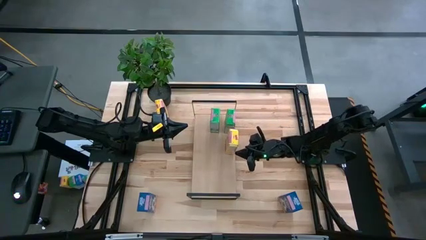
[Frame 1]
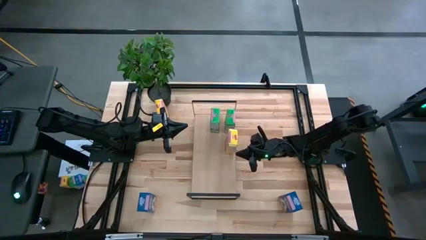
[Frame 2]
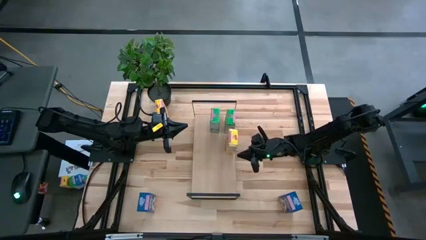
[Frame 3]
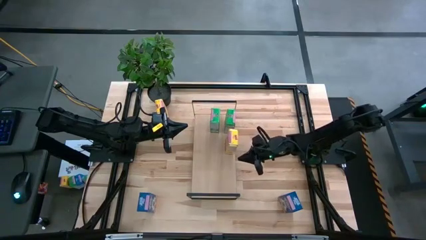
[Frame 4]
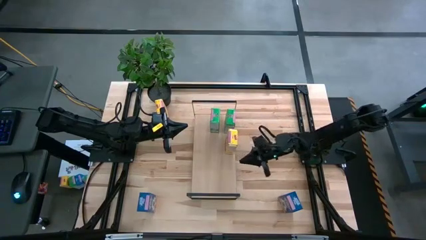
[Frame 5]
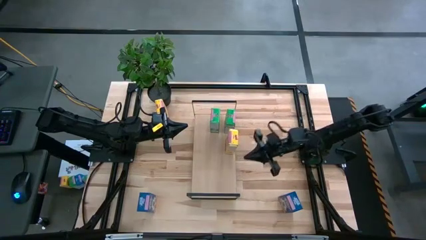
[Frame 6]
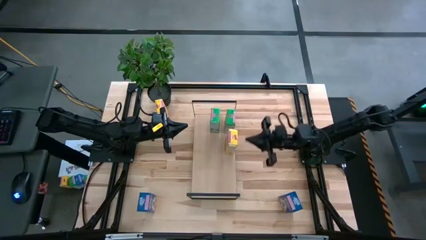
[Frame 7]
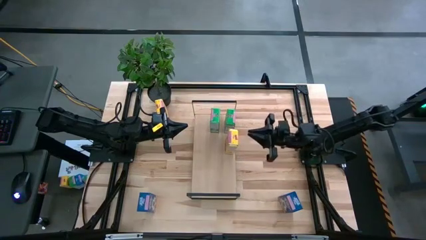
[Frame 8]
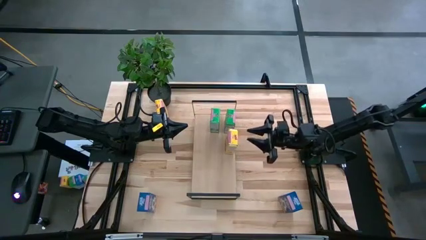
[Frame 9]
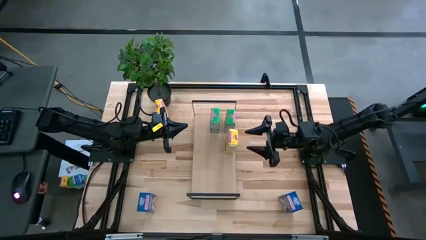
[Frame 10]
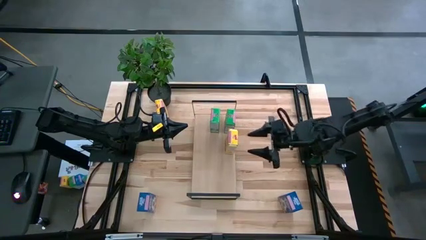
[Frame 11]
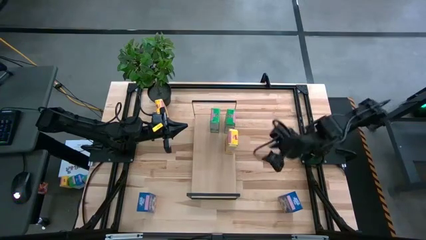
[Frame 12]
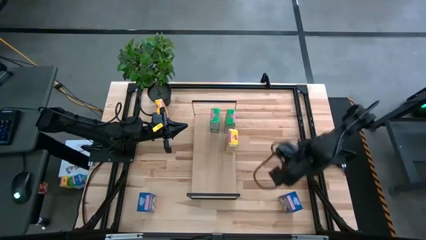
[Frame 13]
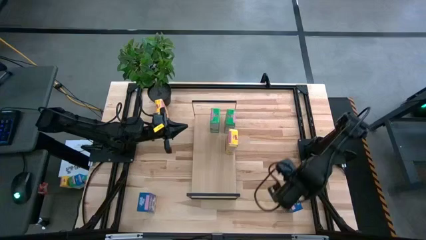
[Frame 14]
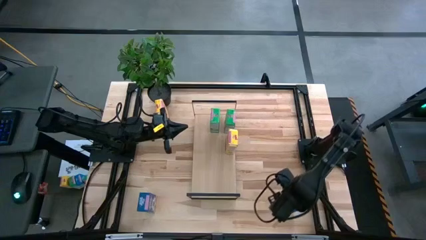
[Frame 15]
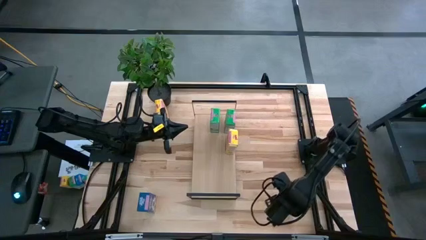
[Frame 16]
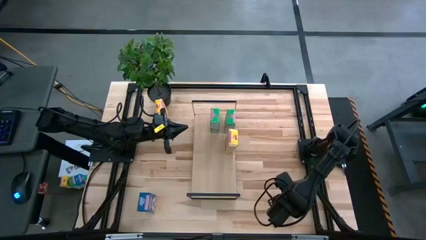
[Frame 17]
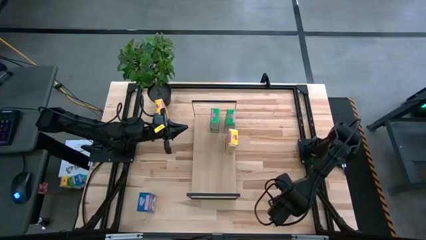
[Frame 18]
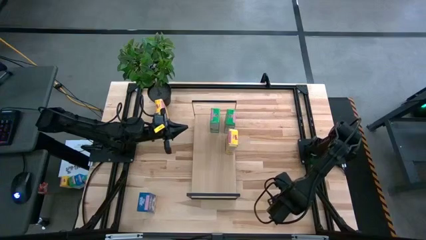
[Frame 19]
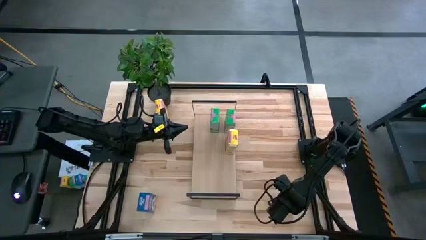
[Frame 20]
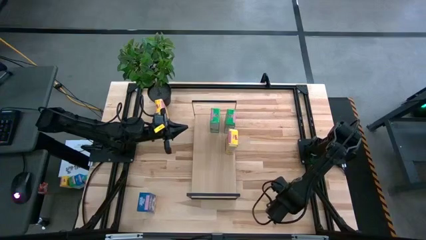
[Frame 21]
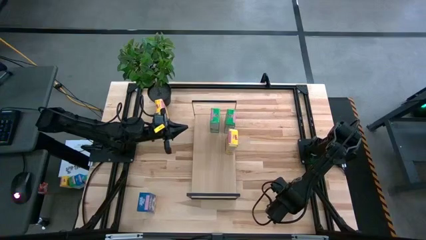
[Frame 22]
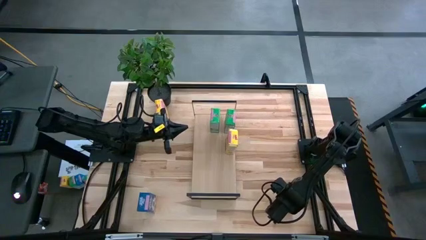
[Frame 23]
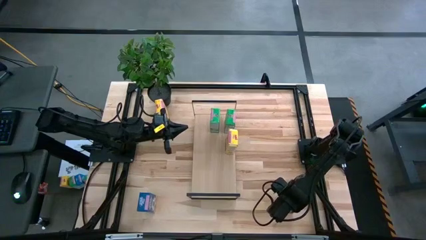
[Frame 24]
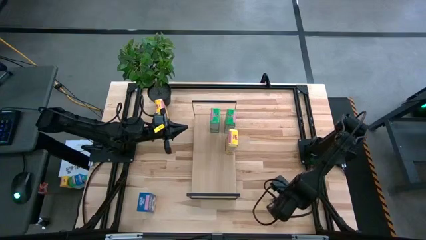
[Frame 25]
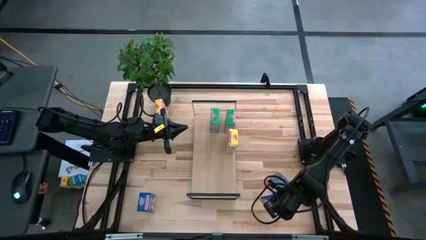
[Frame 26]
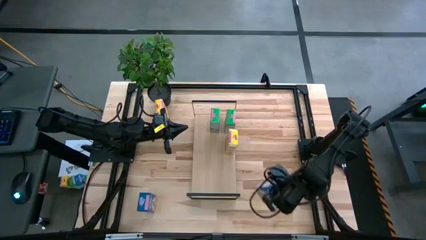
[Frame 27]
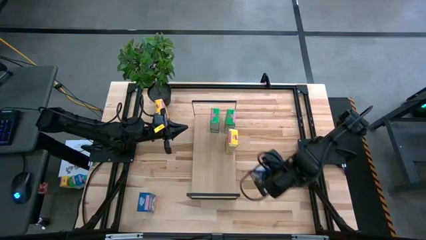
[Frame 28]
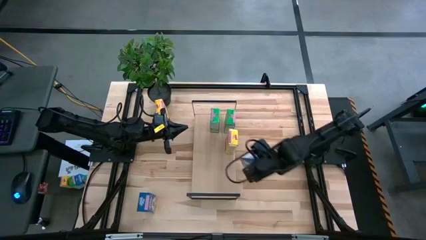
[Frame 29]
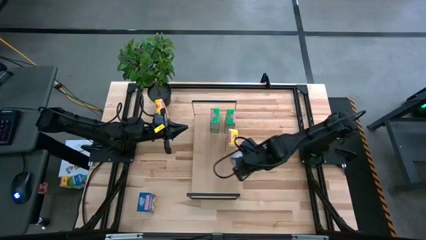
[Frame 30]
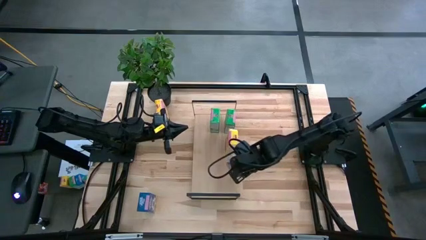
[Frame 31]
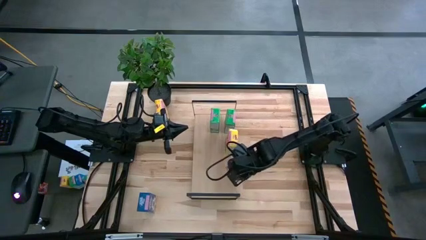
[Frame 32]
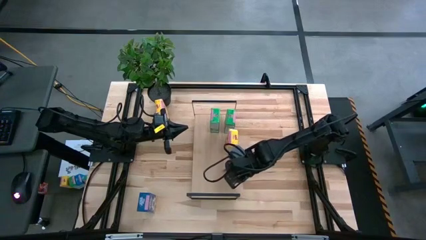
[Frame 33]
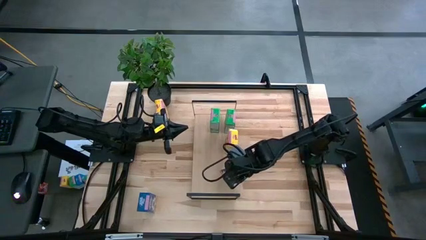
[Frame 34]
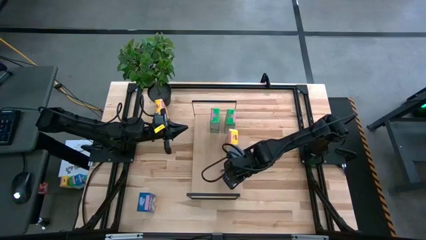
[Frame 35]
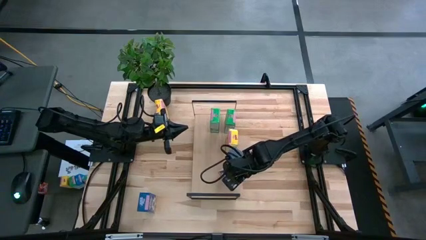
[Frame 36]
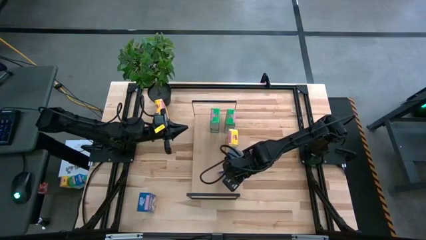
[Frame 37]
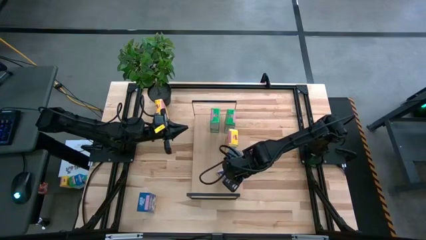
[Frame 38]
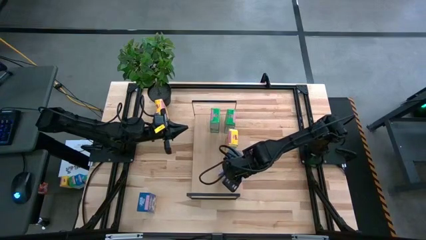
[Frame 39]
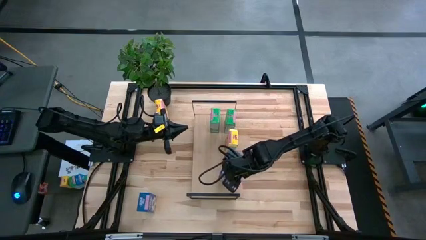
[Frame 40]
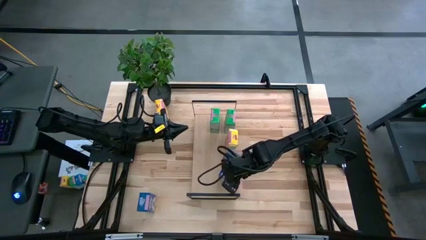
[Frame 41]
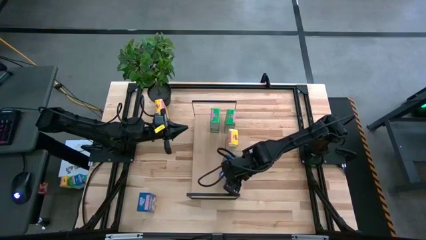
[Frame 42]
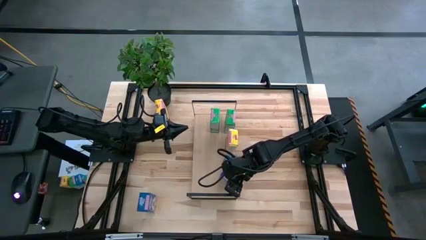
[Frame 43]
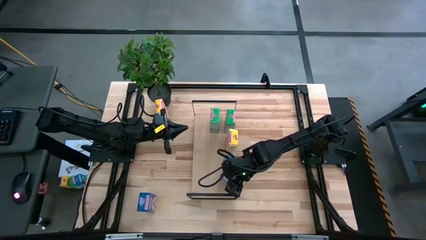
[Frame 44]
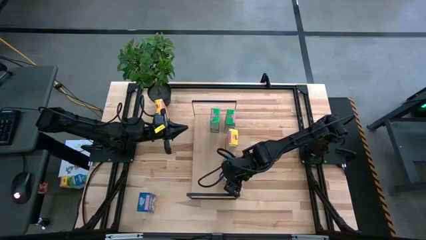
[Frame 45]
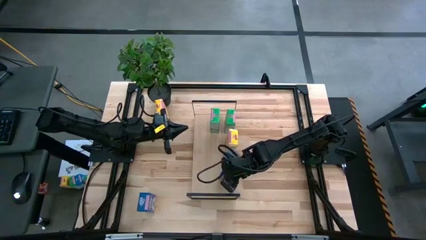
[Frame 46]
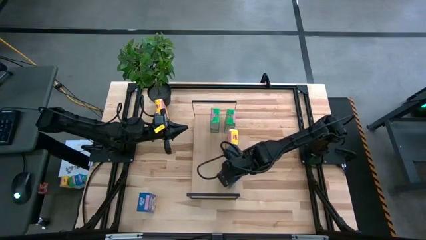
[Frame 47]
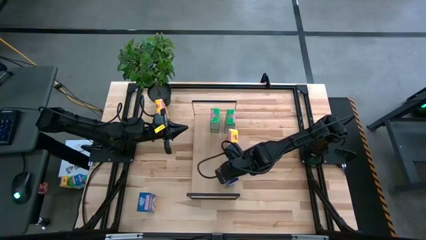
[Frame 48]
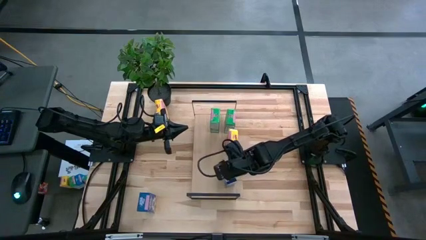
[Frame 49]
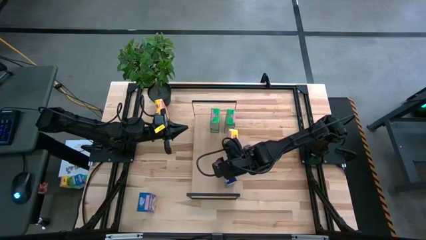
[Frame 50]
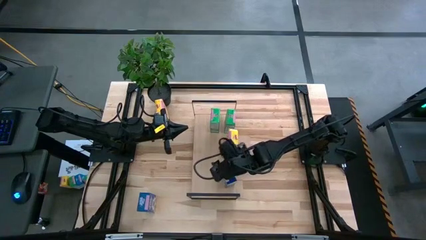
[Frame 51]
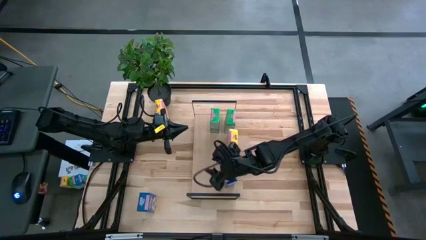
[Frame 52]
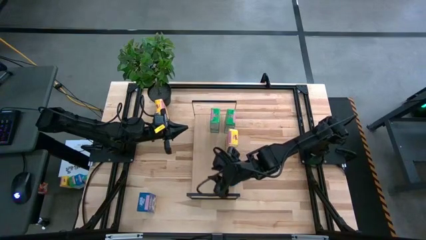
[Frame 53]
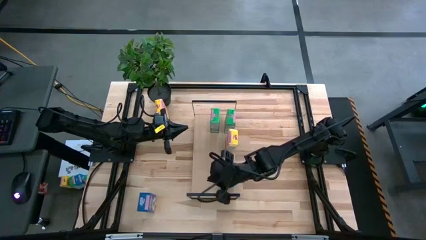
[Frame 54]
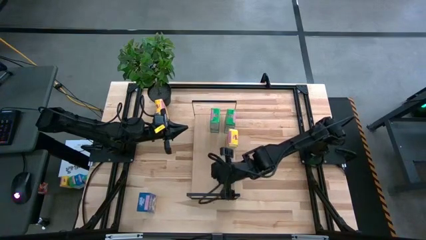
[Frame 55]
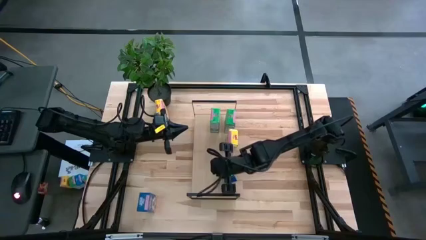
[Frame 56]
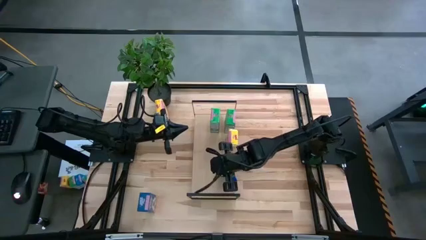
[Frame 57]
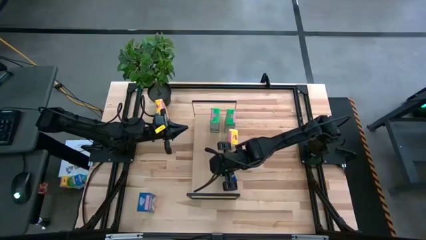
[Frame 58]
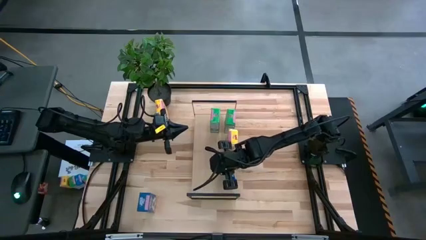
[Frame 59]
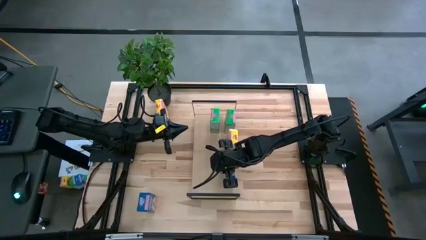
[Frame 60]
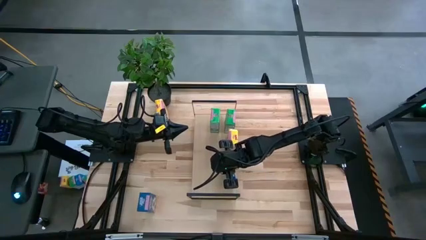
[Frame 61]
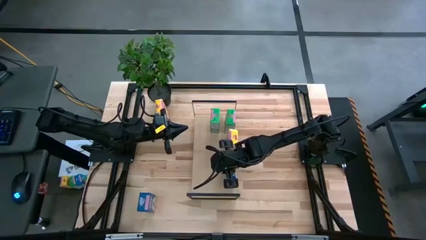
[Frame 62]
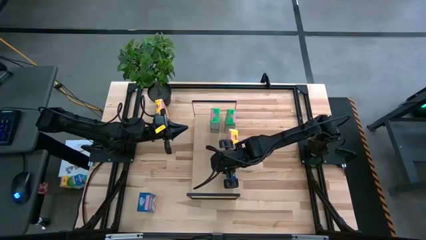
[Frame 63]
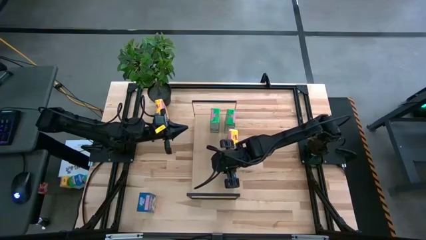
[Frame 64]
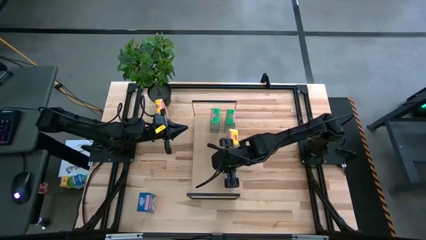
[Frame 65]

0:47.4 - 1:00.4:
Task: Stack cereal on shelf
Put the right blue cereal box on the shelf

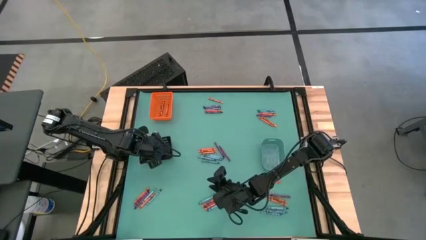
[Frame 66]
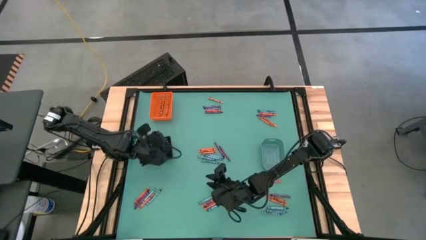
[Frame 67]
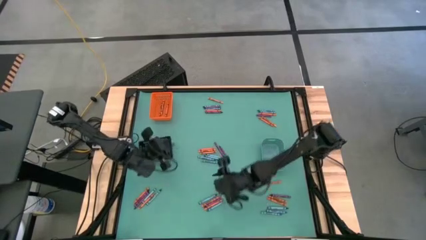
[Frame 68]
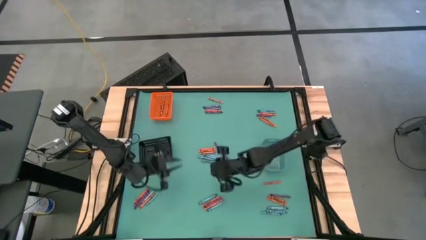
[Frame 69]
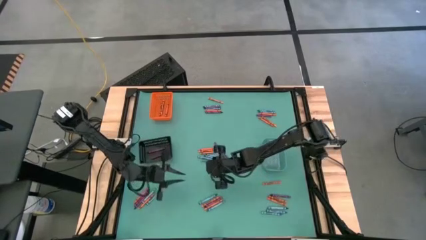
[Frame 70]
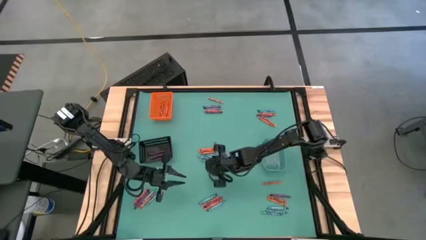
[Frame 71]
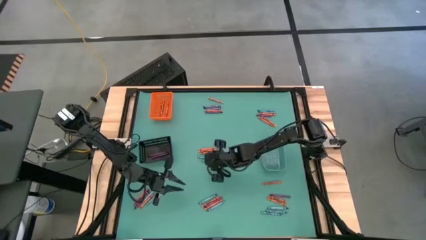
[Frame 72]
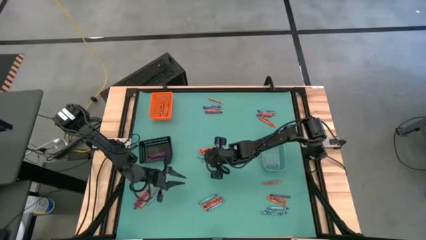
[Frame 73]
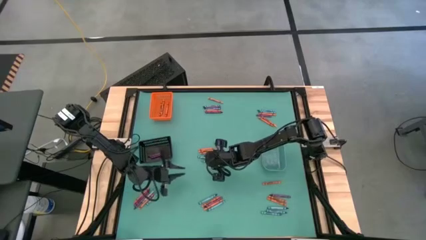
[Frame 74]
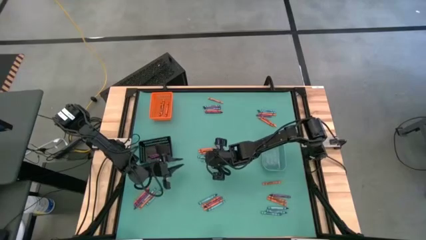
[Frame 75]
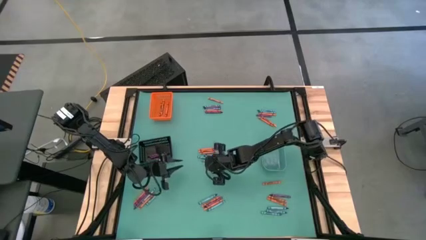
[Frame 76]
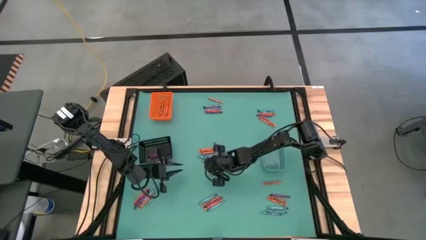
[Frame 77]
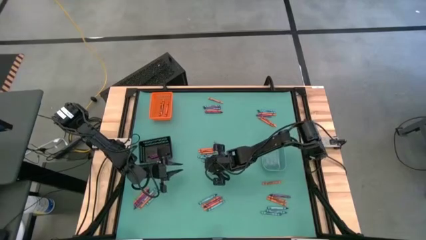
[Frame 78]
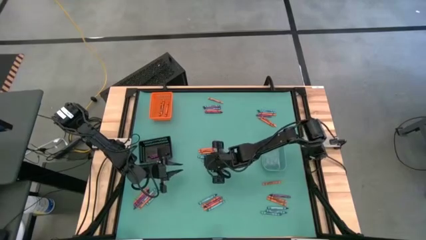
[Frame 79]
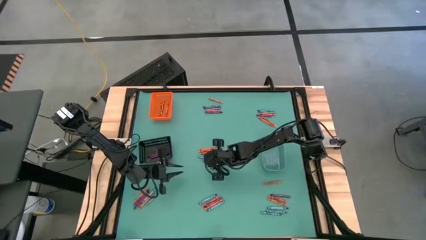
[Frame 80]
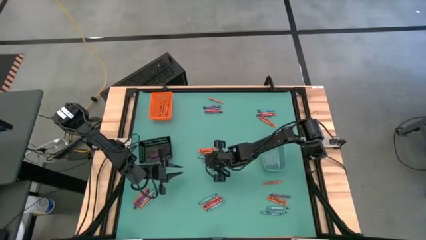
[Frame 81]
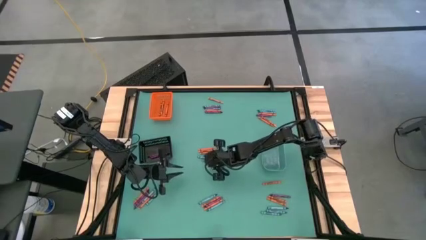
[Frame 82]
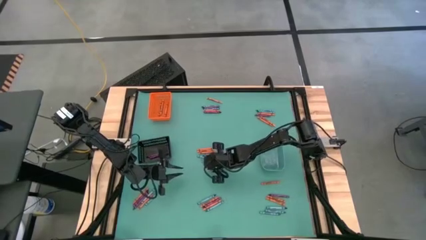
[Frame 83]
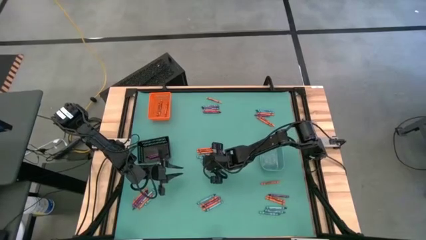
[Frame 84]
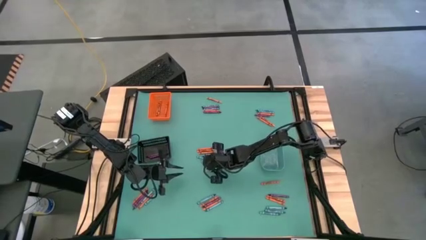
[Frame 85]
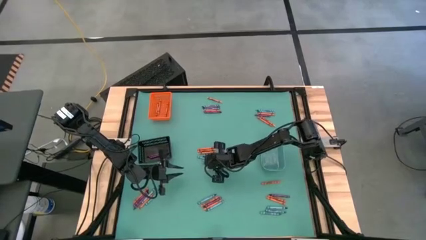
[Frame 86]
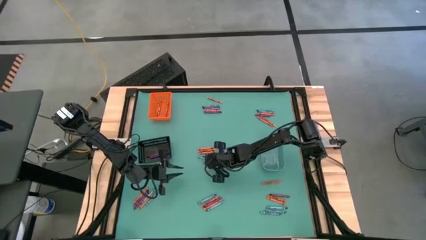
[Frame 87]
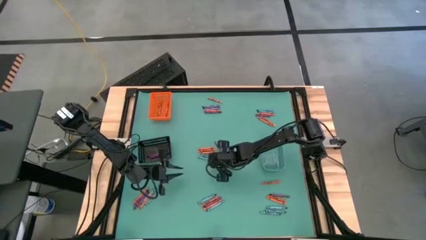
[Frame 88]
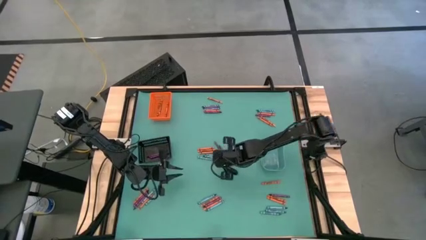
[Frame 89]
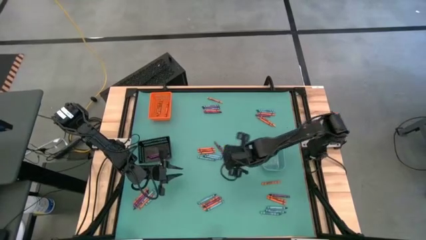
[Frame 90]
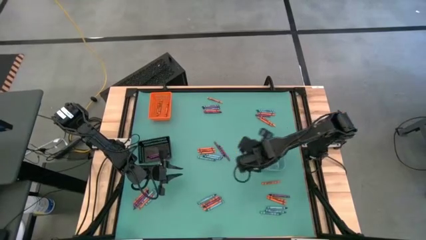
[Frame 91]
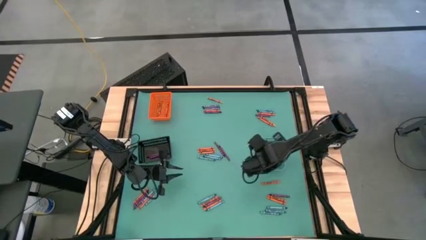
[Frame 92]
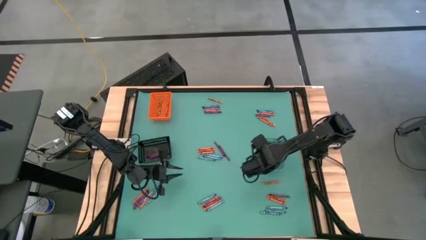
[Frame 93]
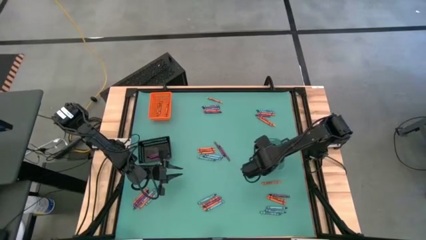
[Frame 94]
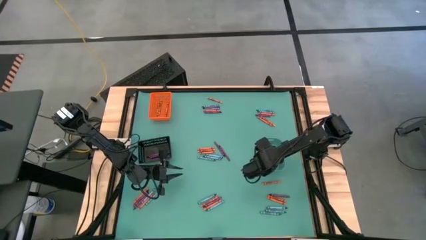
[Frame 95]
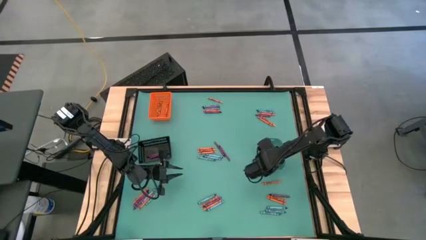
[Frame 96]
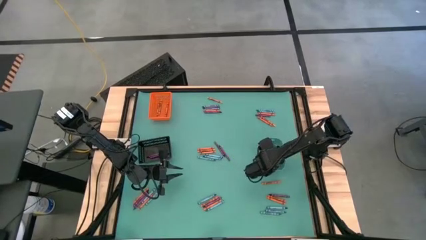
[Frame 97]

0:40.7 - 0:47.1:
Task: Sort crayons
Put the light blue crayon into the blue bin
